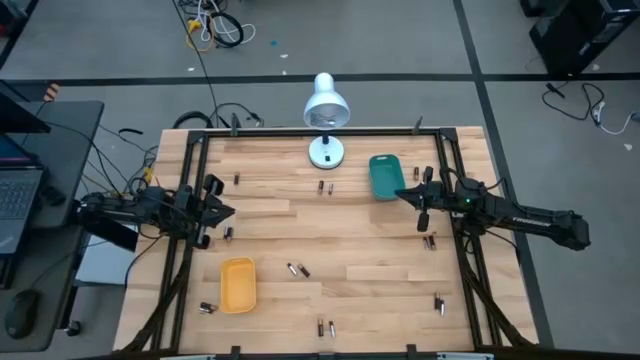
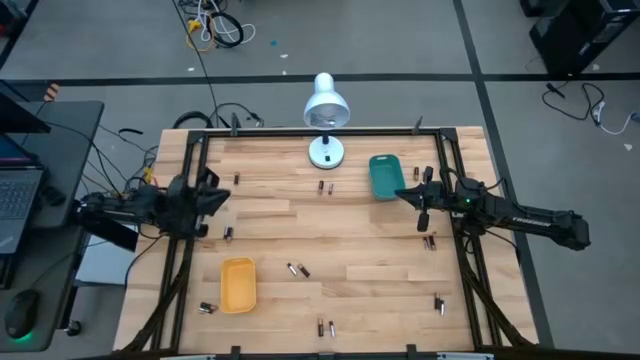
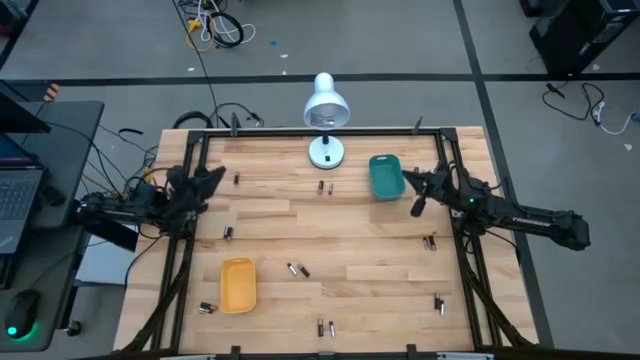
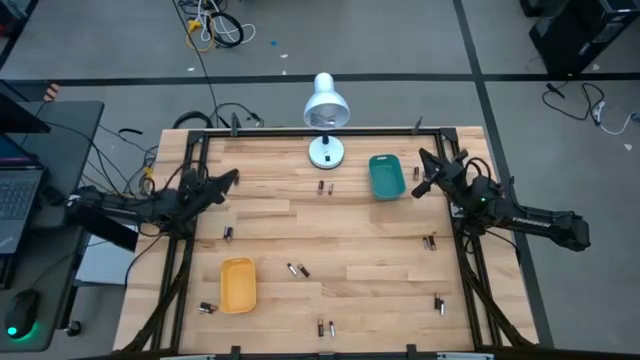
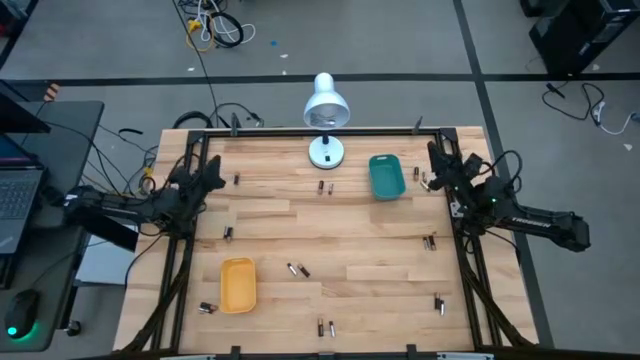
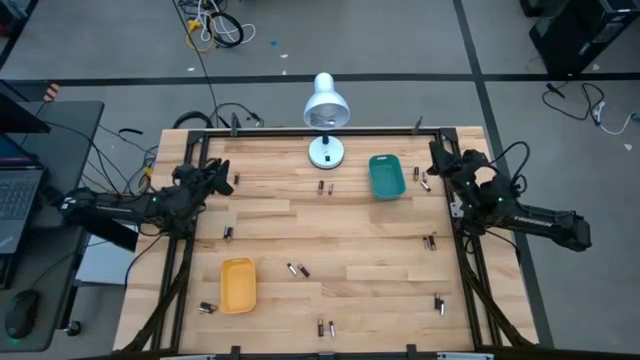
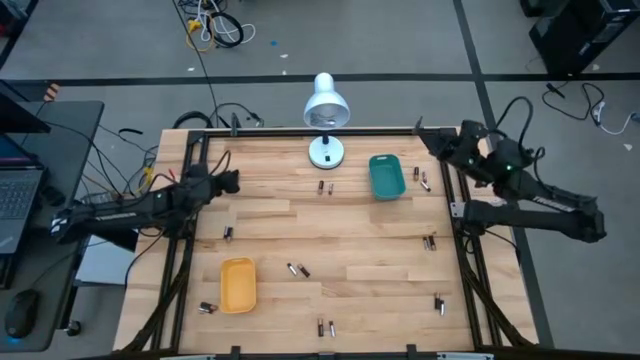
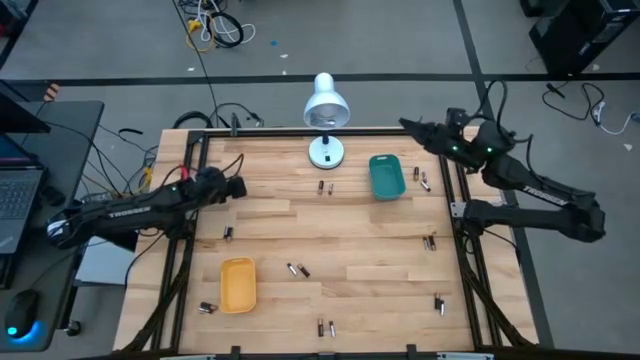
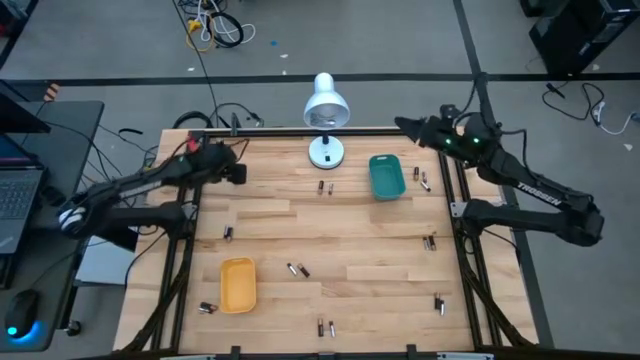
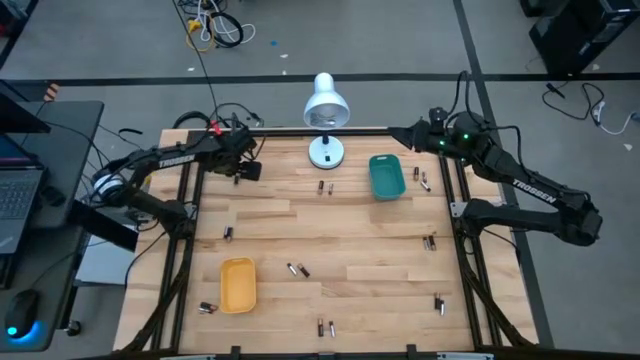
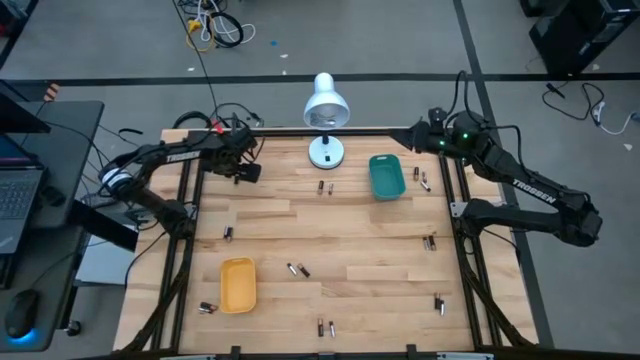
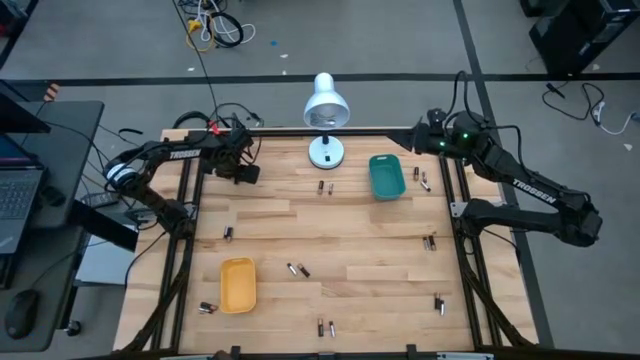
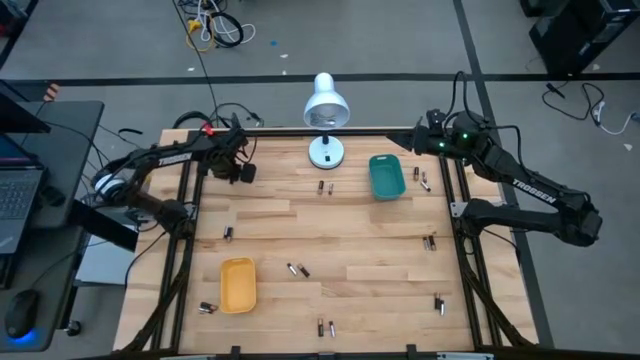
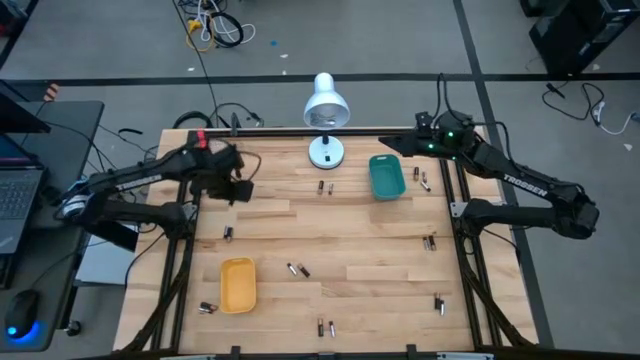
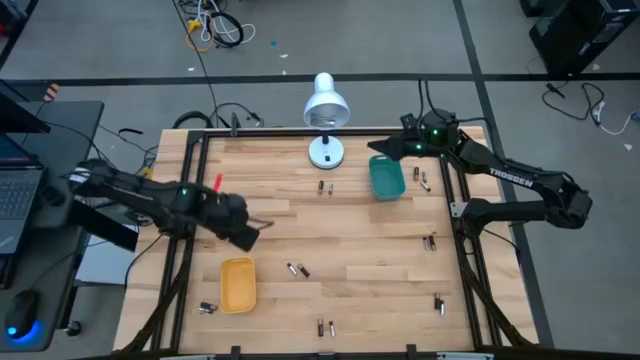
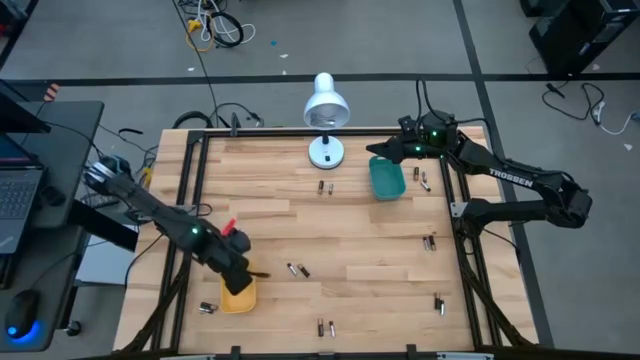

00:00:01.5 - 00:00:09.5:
Task: Sort batteries
Put the golden battery into the yellow bin

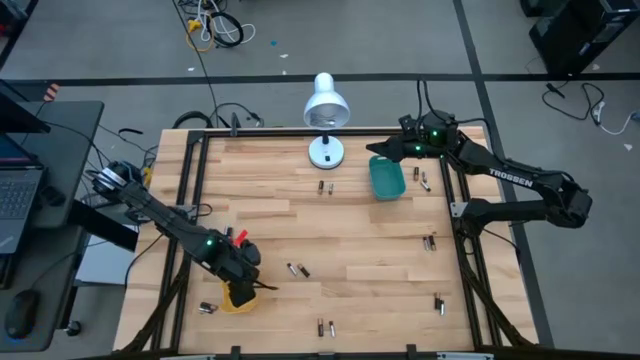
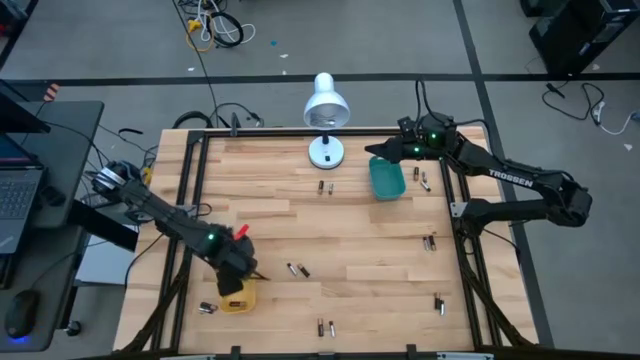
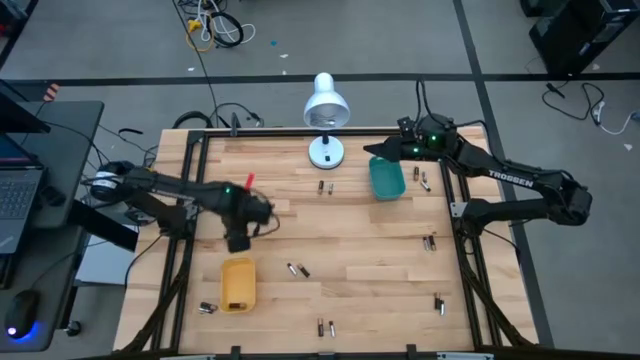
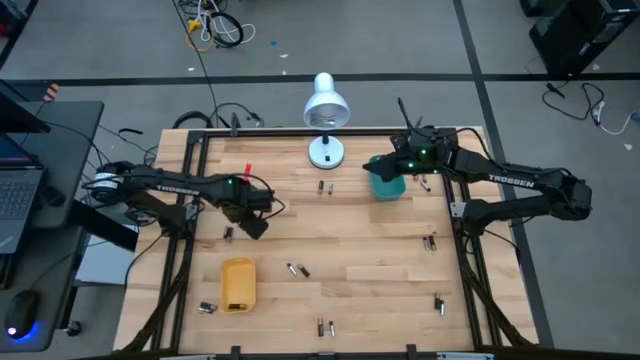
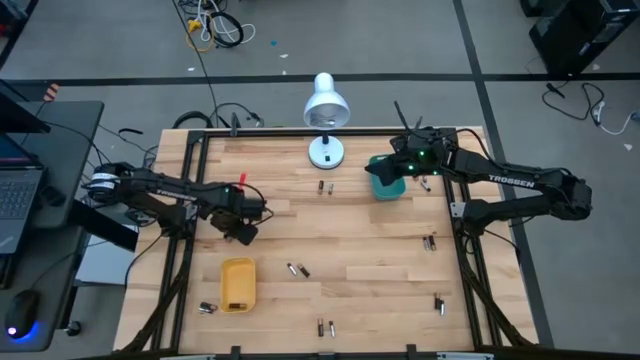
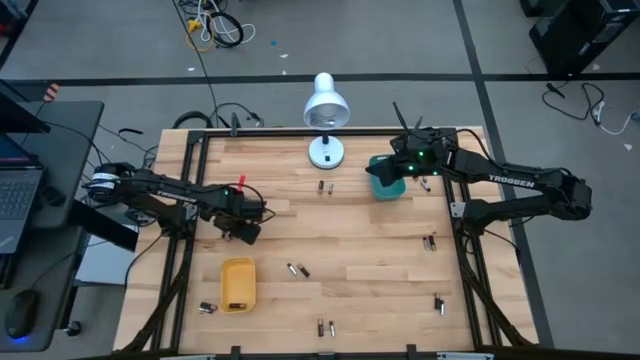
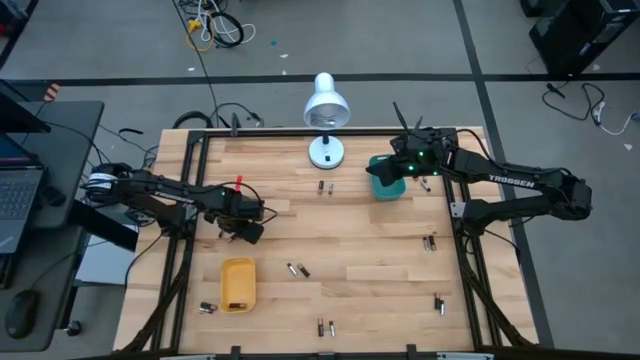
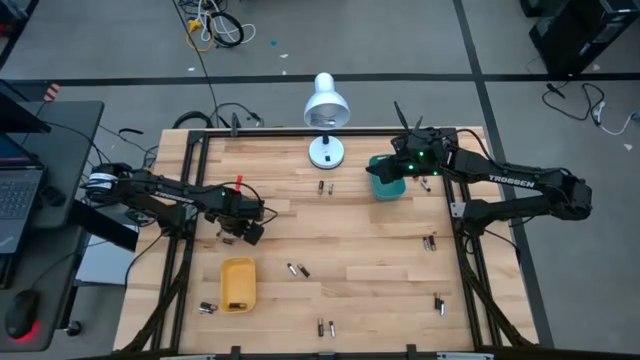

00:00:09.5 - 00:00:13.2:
Put the golden battery into the yellow bin

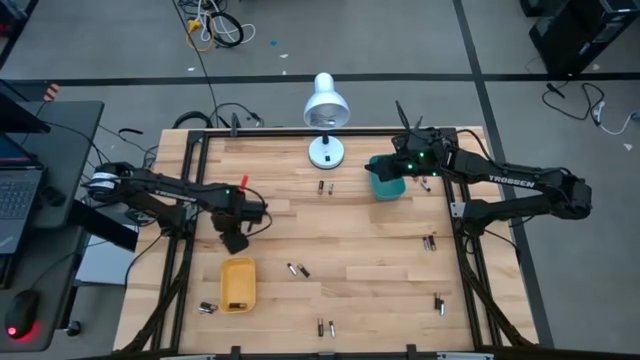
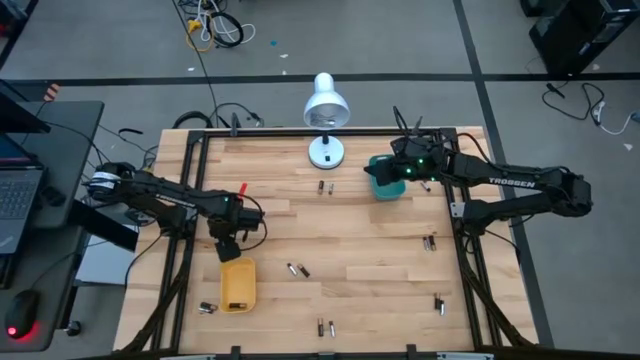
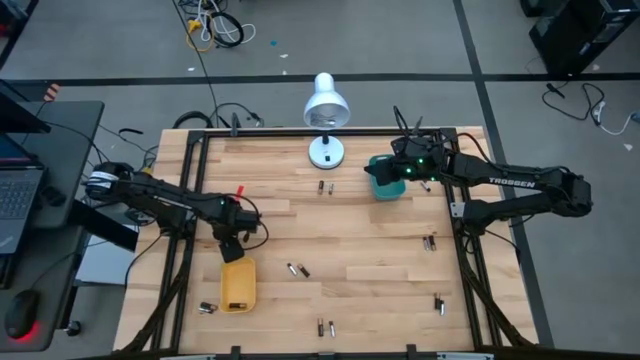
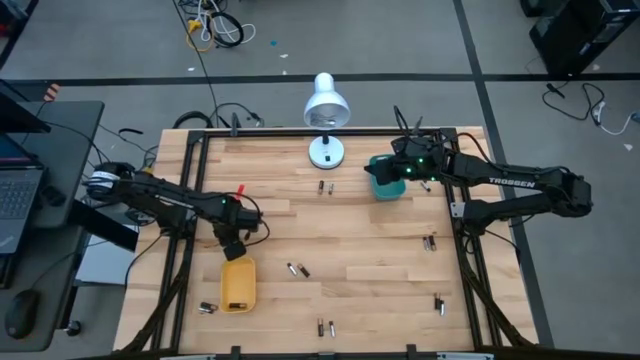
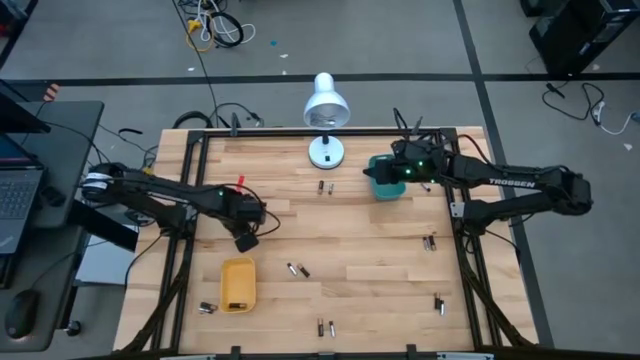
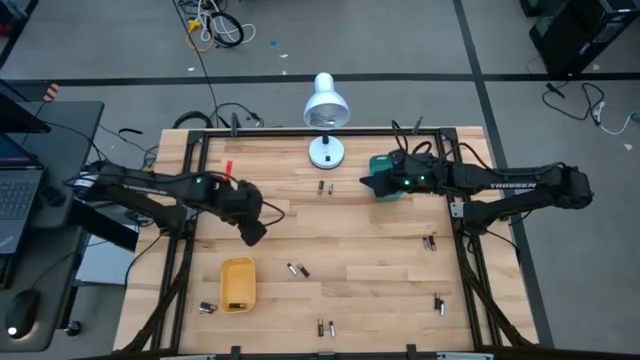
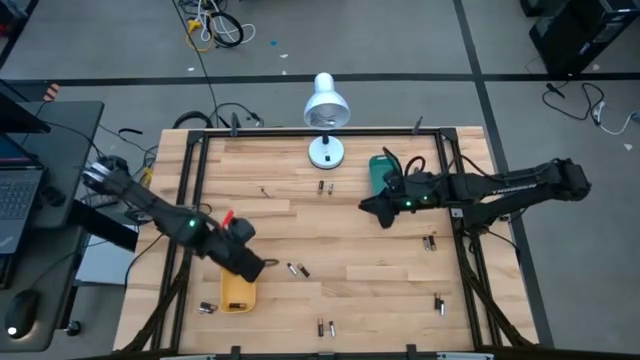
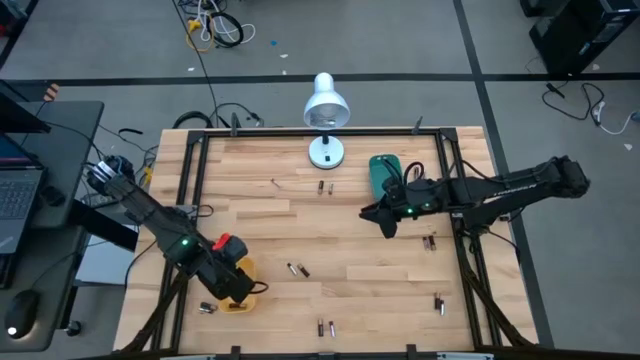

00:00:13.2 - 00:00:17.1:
Put the golden battery into the yellow bin

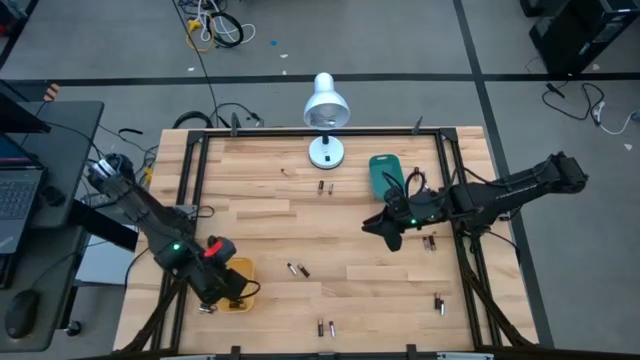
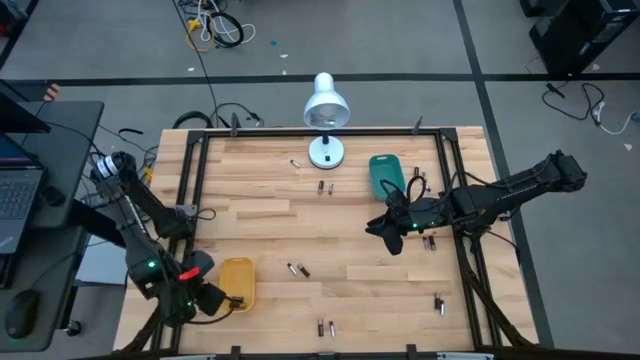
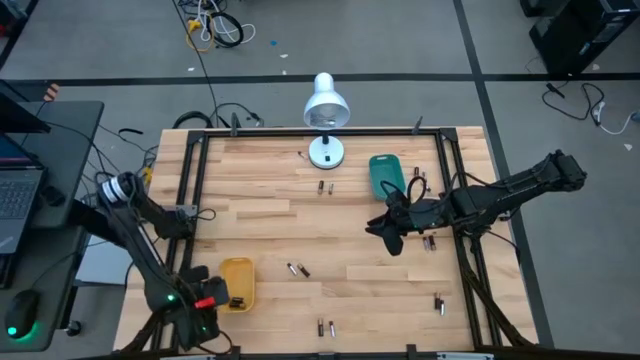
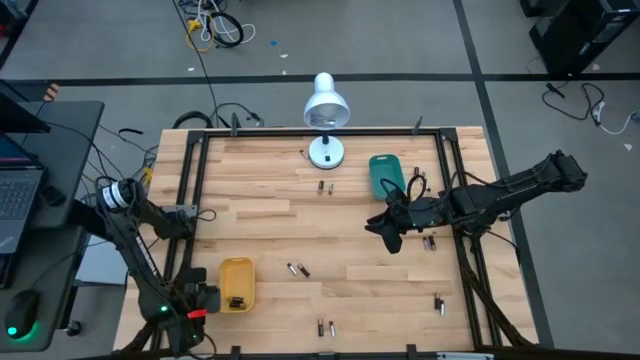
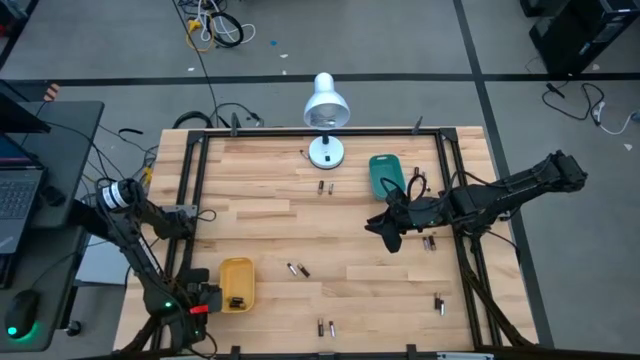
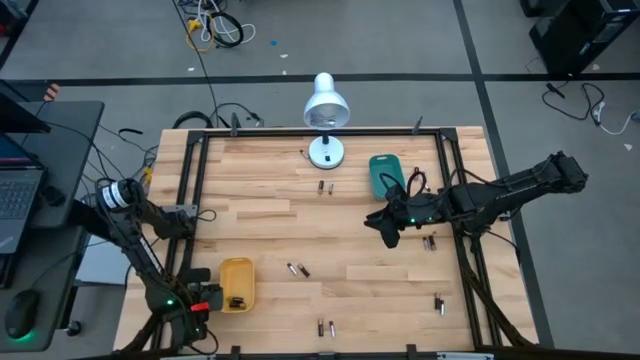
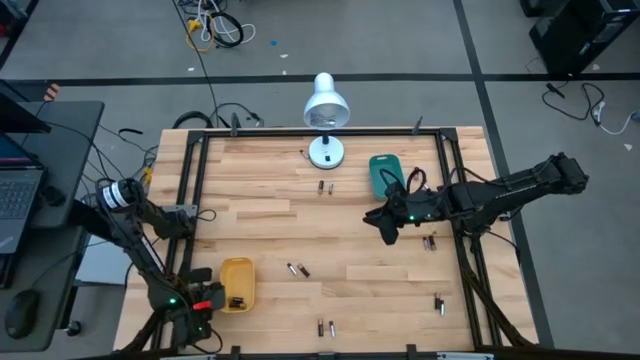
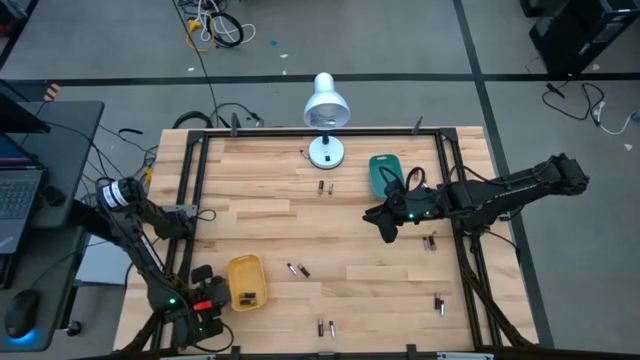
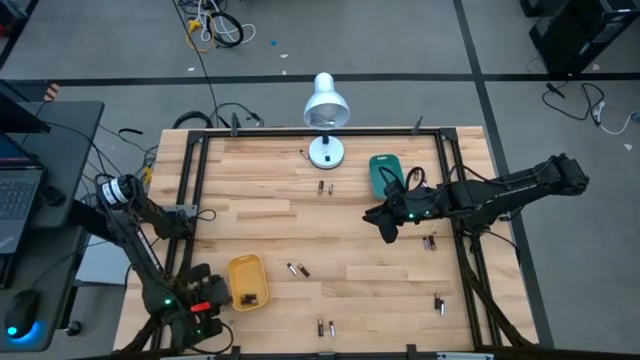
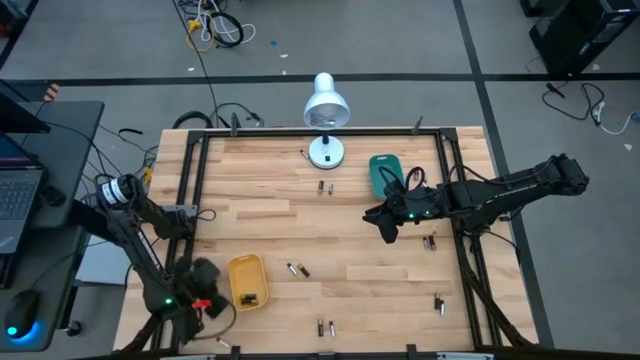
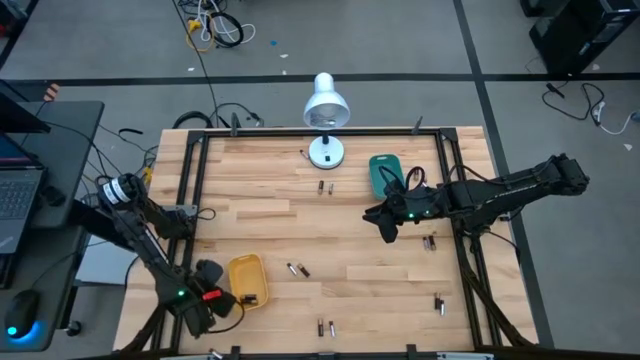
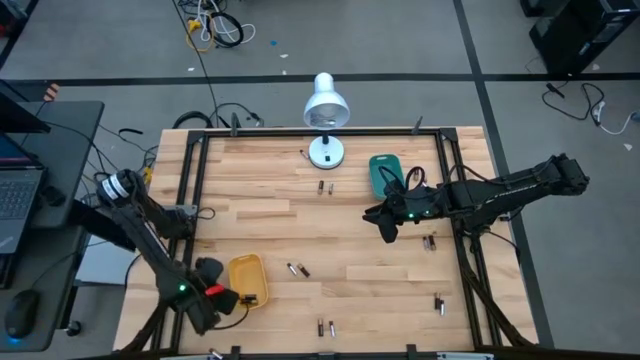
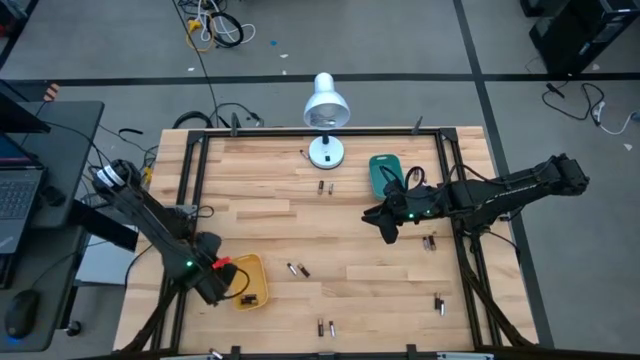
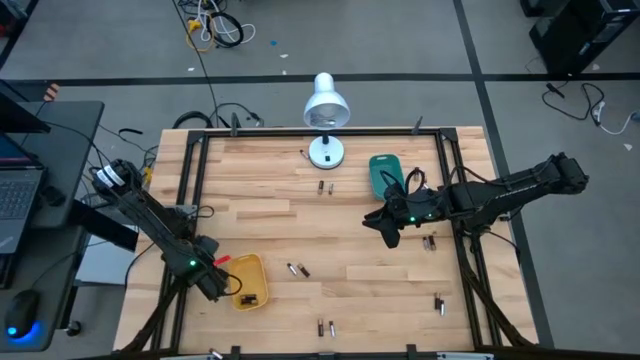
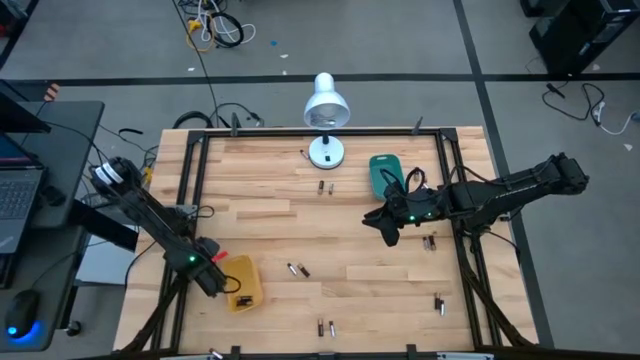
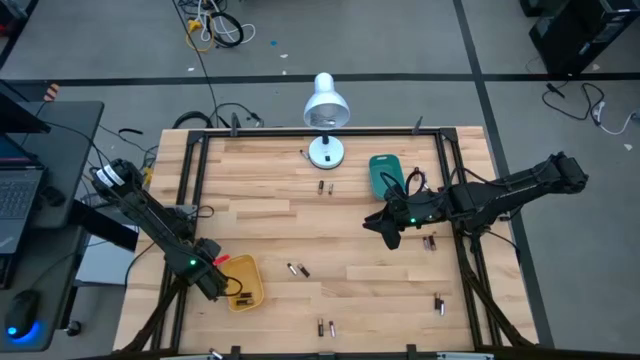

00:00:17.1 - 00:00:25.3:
Put the golden battery into the yellow bin
